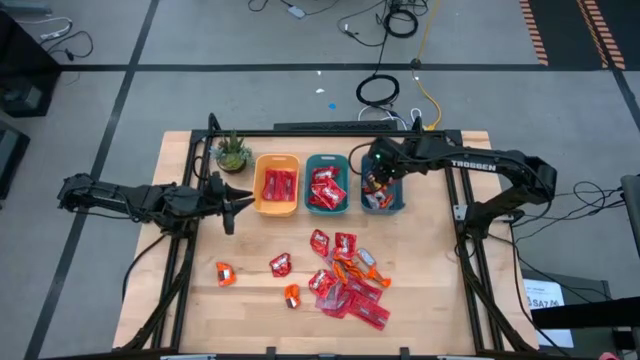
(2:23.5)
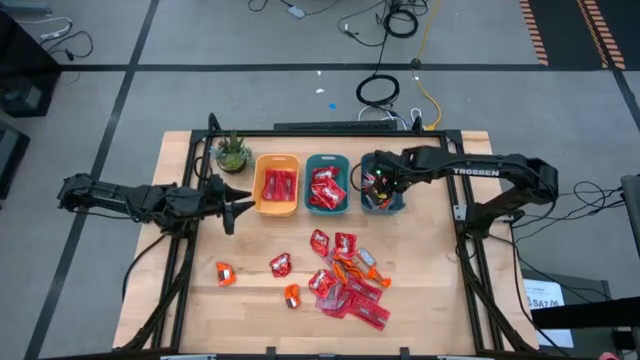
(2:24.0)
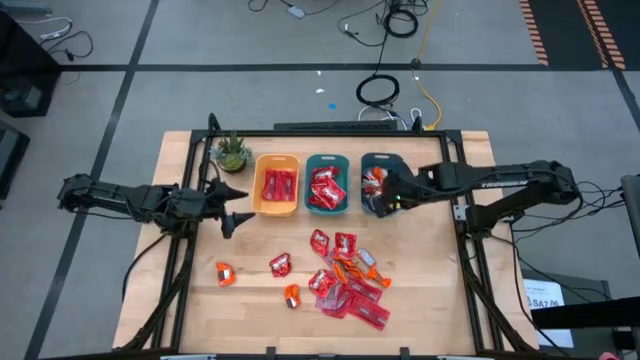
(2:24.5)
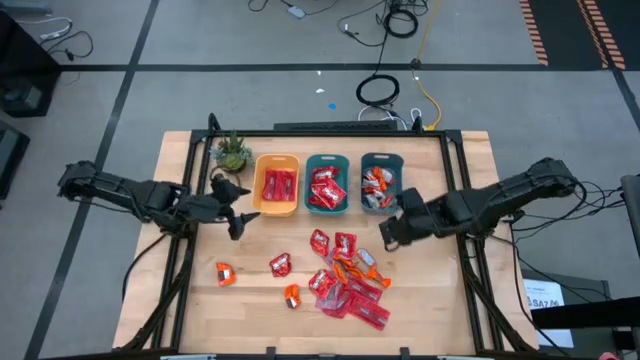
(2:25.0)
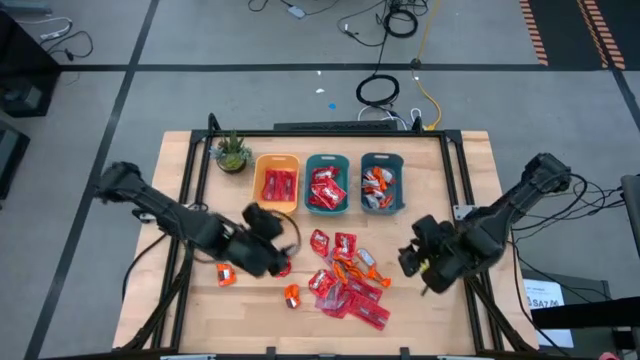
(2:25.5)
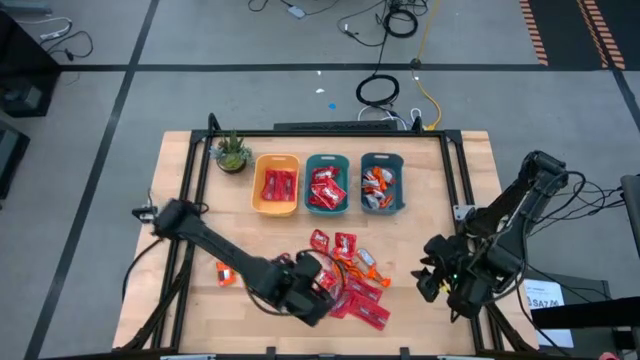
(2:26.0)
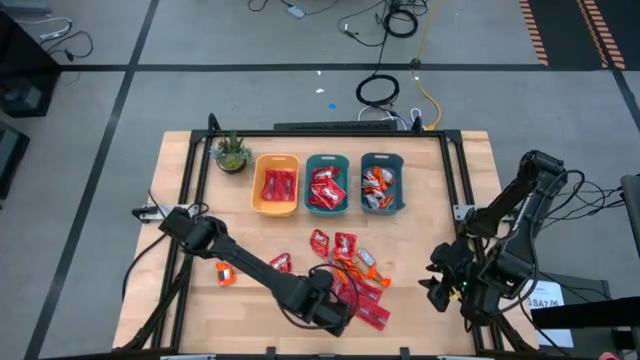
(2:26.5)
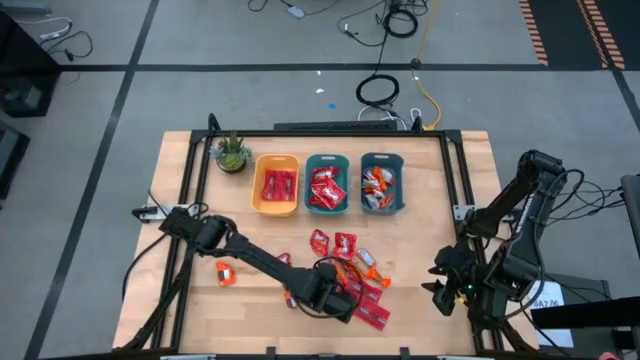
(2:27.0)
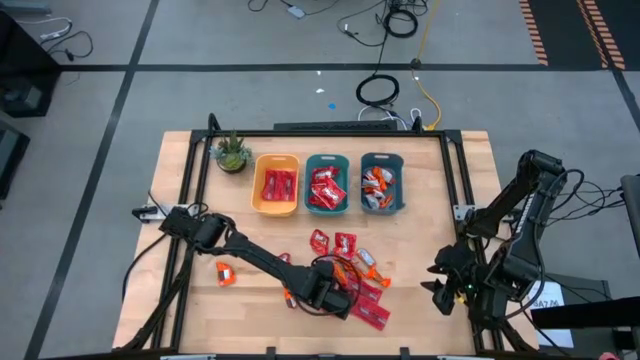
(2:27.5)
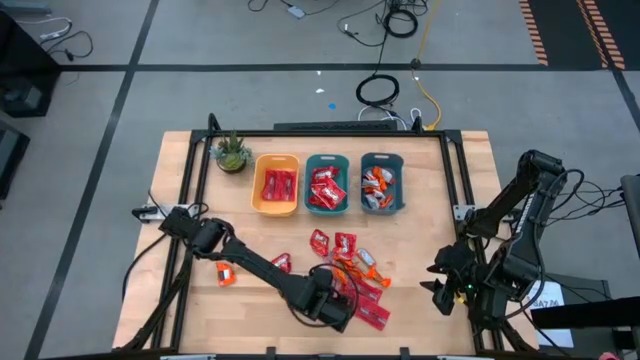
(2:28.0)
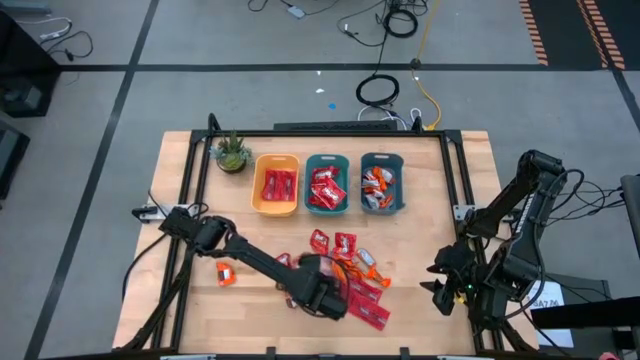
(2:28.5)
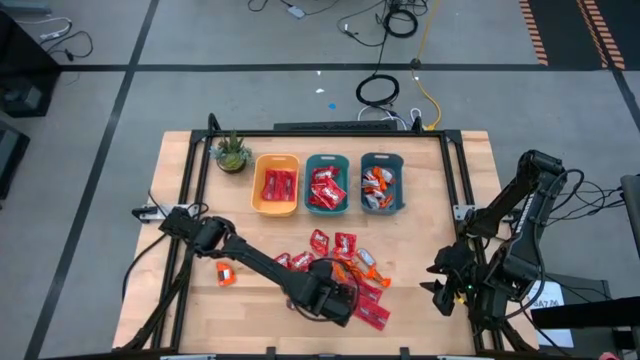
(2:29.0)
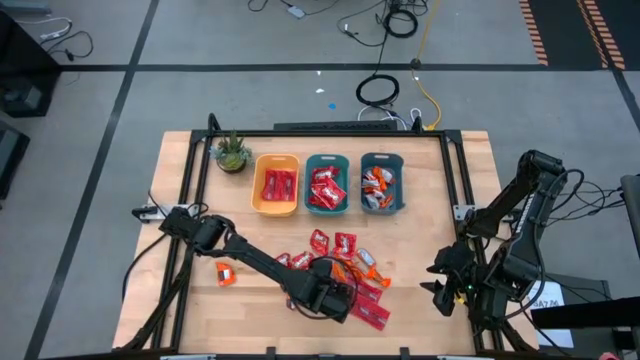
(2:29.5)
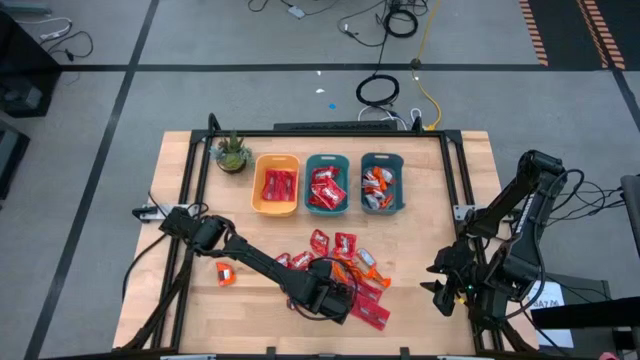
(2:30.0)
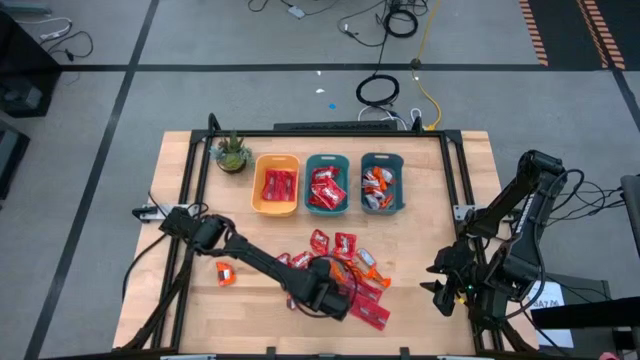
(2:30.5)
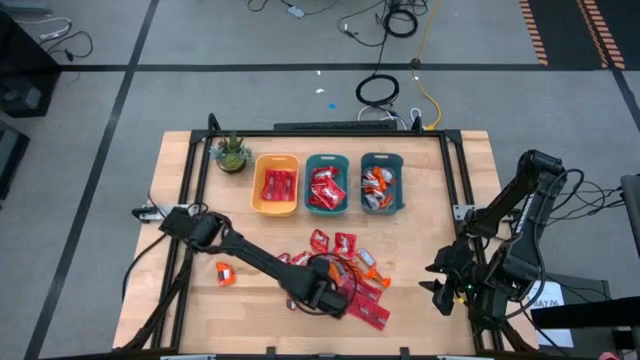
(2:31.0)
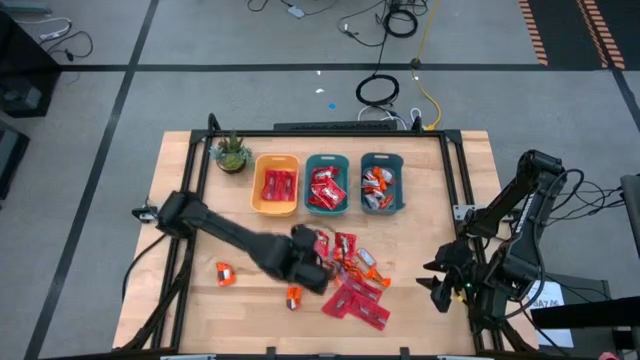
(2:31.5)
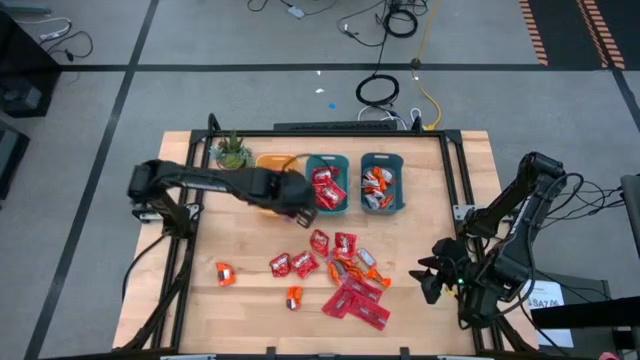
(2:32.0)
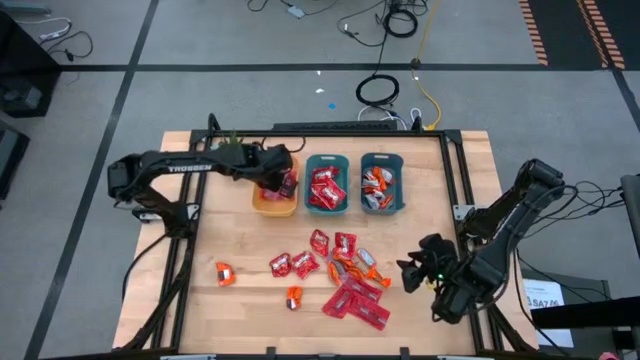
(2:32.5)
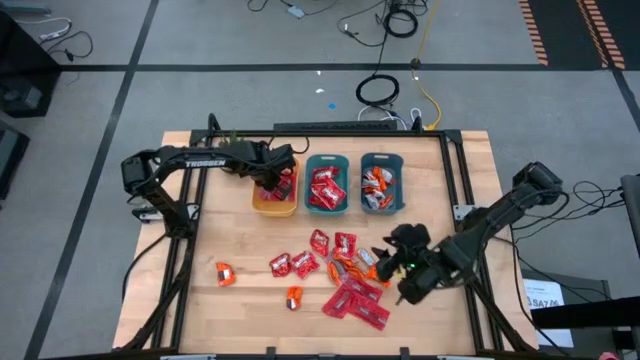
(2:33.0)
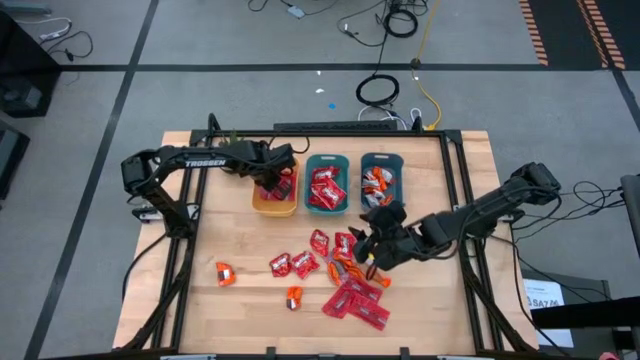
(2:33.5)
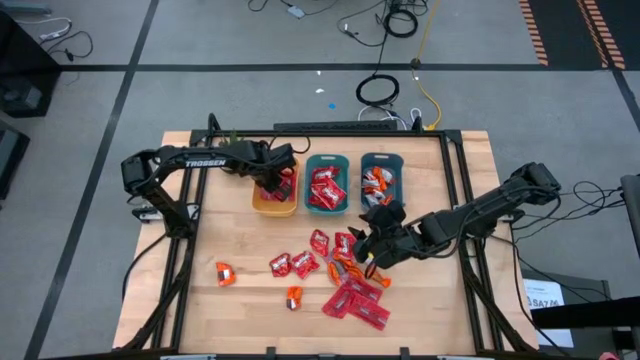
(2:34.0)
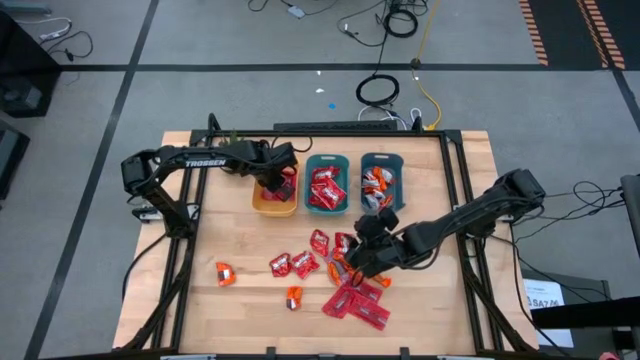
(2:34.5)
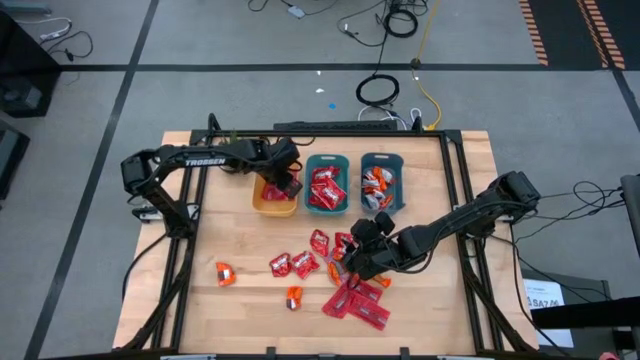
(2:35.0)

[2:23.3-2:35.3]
Task: Sort candy
Put the red candy into the top left yellow bin

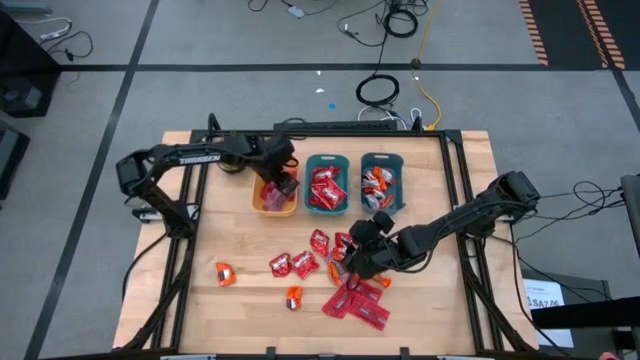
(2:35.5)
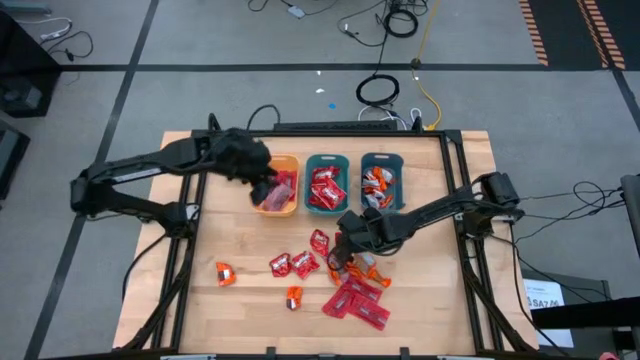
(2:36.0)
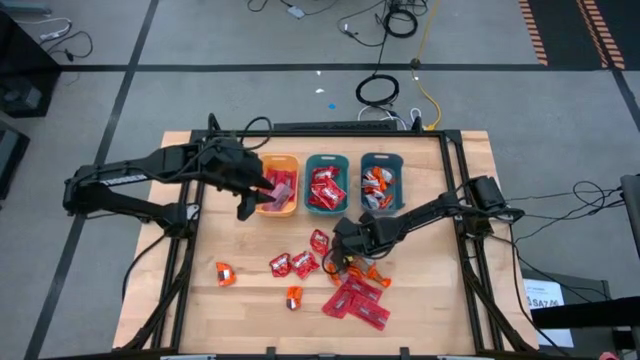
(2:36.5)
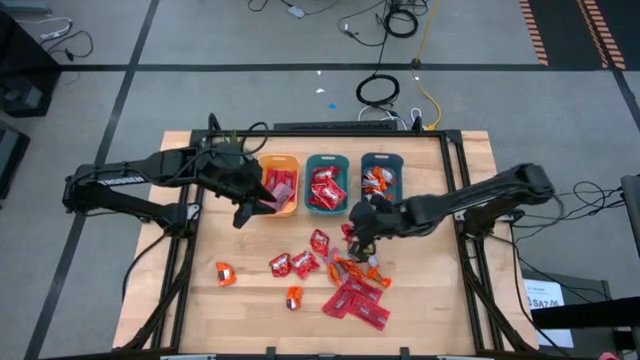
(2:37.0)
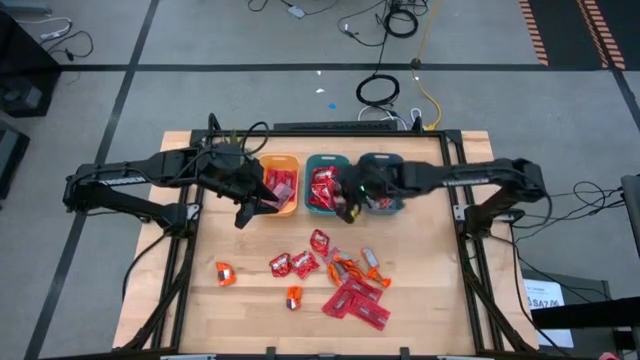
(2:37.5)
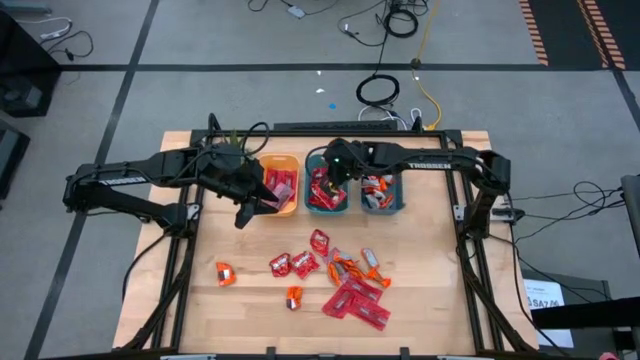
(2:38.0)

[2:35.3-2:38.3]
Put the red candy into the top center green bin

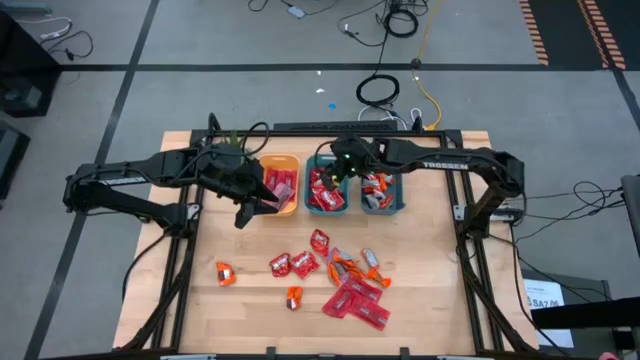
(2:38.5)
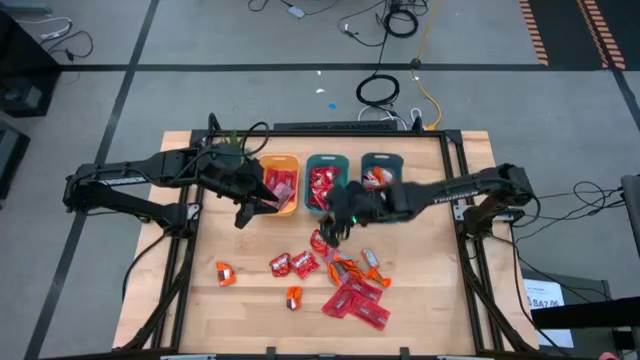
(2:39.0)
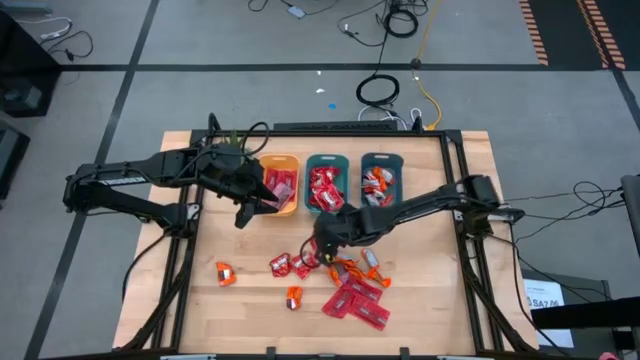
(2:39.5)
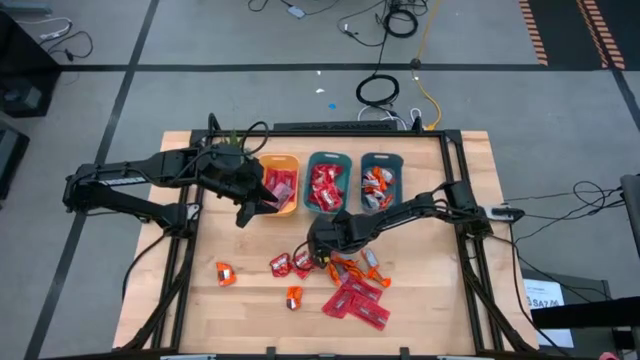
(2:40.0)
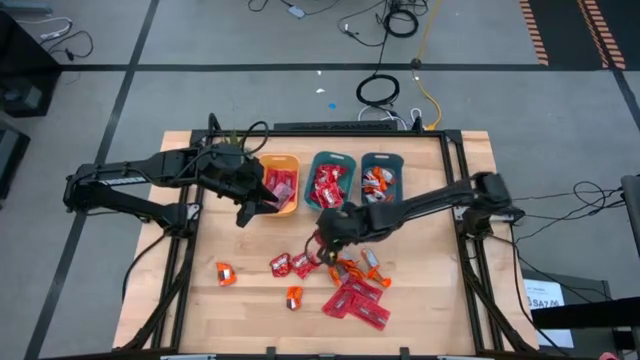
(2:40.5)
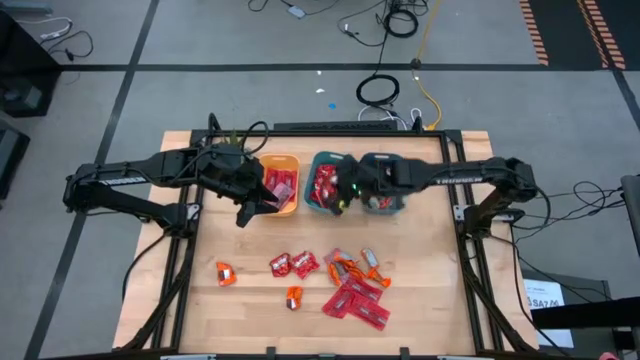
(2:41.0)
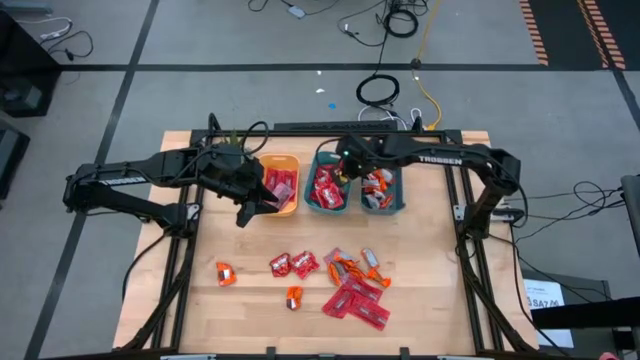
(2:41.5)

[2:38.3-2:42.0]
Put the red candy into the top center green bin

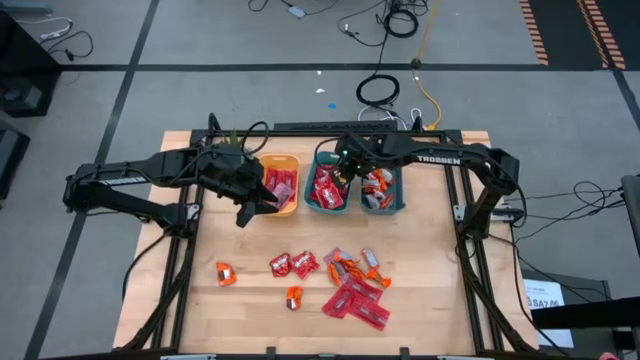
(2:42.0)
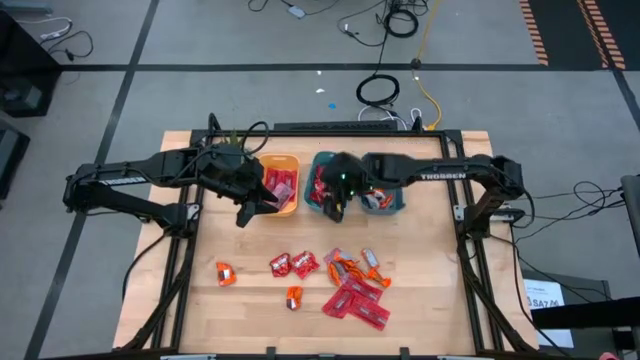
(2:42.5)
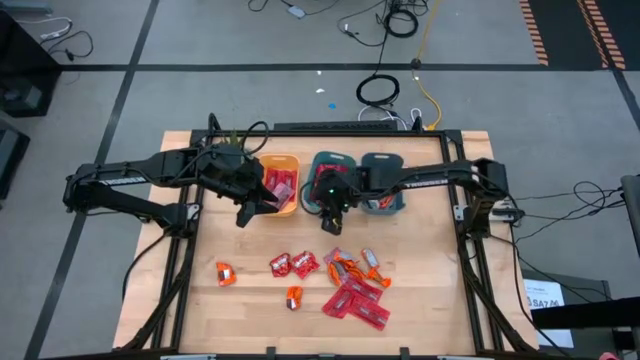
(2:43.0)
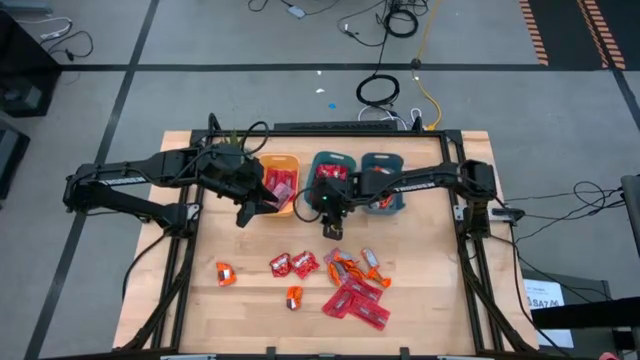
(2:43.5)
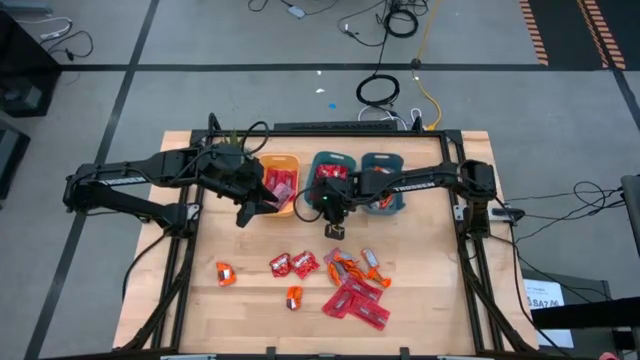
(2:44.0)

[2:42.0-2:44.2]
Adjust the green bin

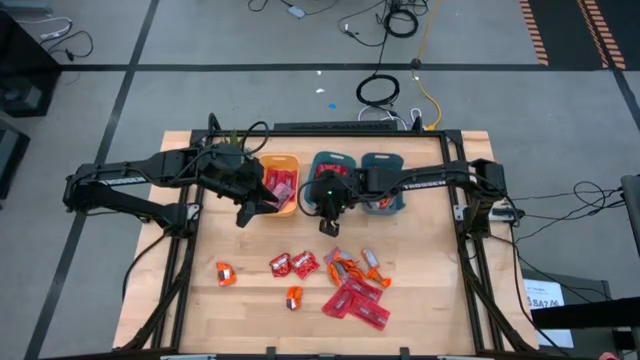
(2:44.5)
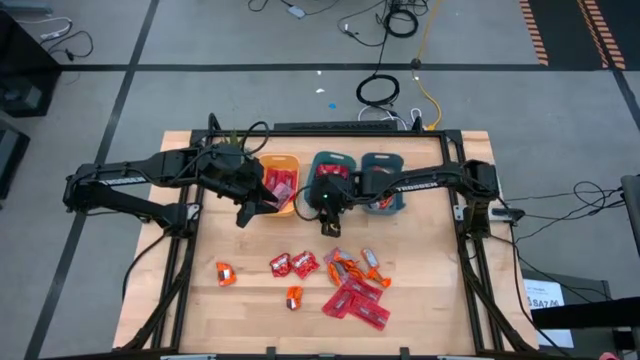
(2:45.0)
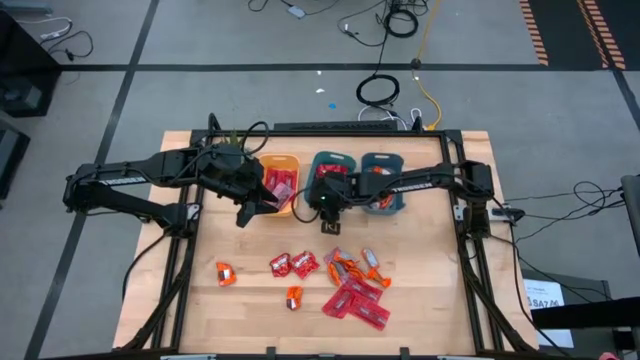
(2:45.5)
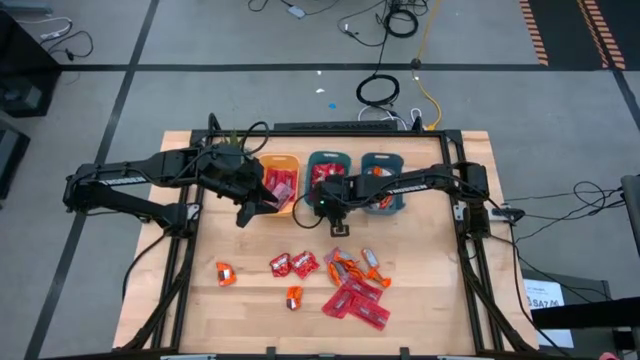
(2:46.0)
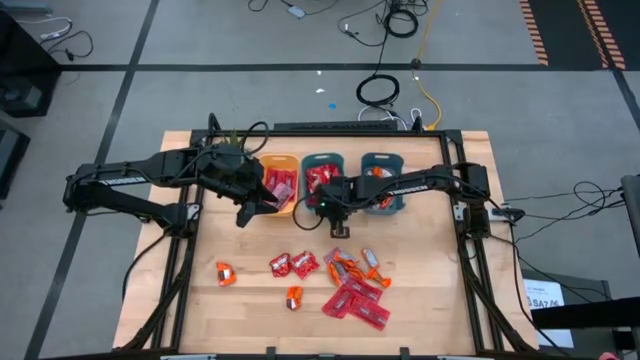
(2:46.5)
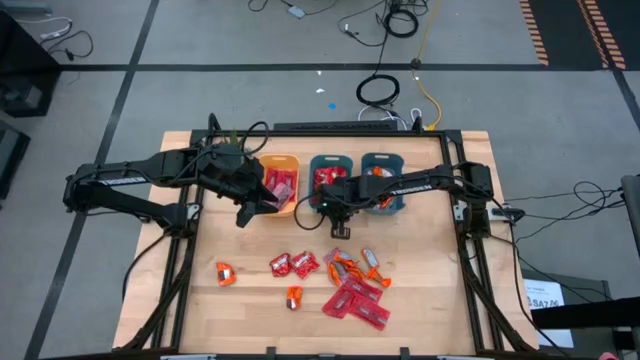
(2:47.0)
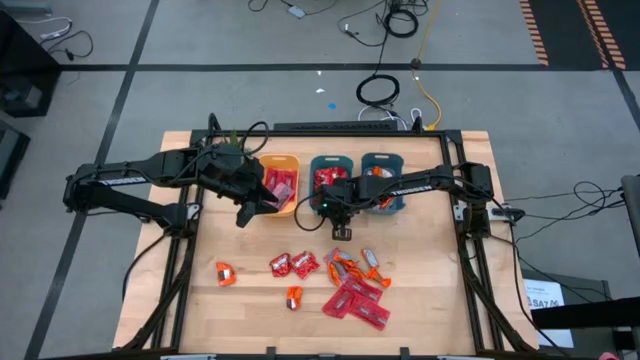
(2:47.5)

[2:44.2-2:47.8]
Adjust the green bin
